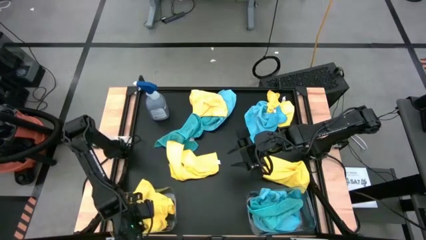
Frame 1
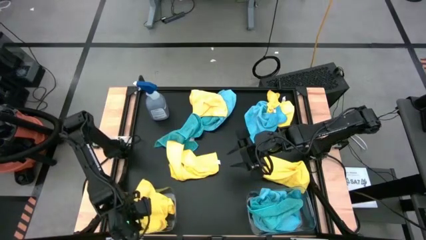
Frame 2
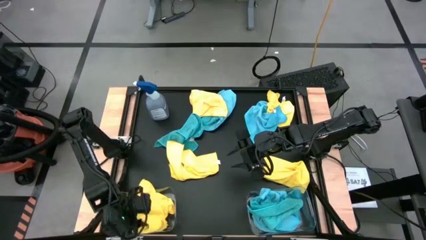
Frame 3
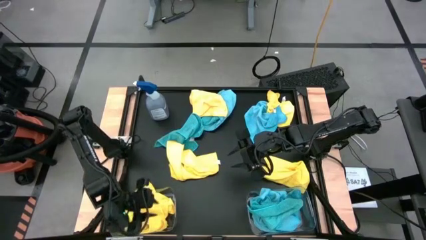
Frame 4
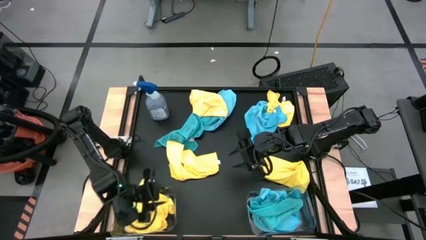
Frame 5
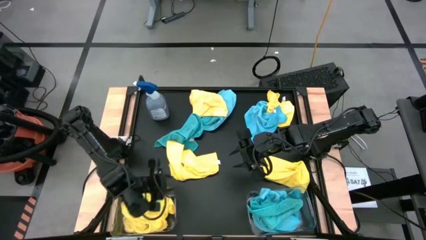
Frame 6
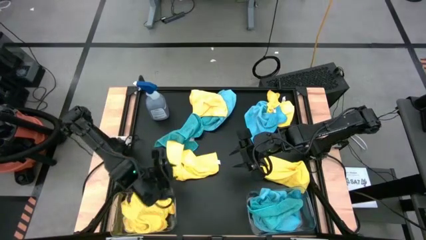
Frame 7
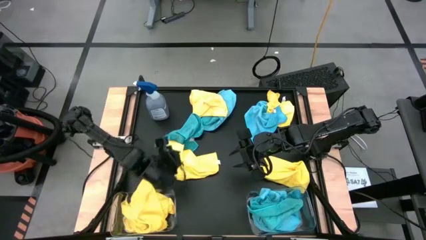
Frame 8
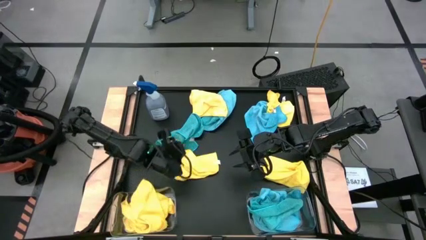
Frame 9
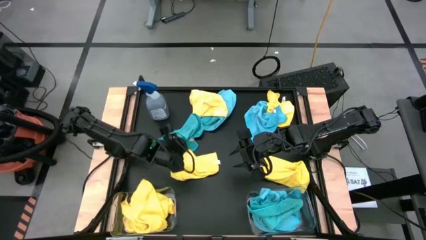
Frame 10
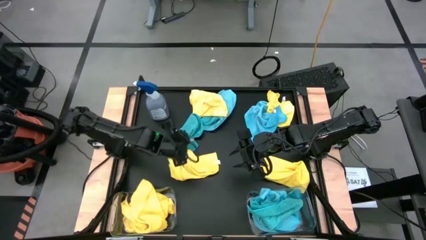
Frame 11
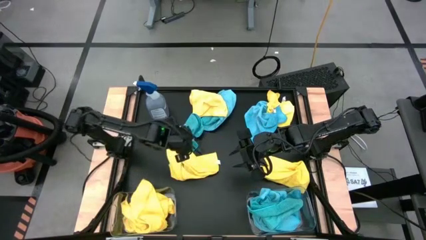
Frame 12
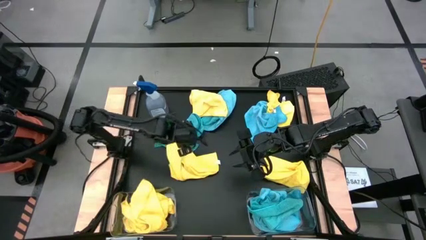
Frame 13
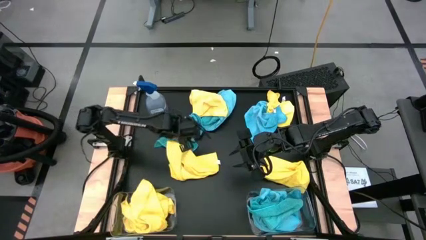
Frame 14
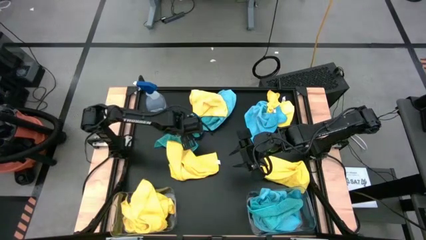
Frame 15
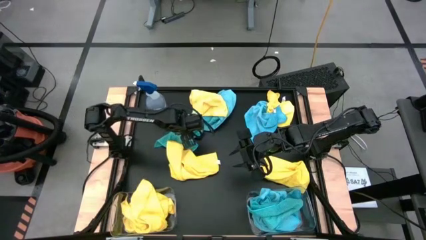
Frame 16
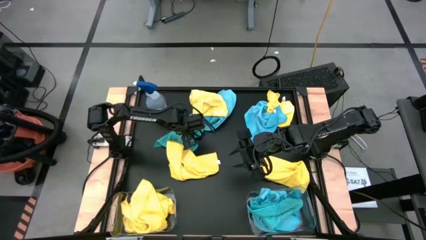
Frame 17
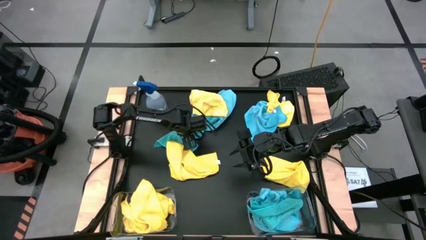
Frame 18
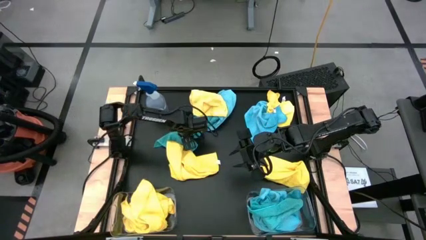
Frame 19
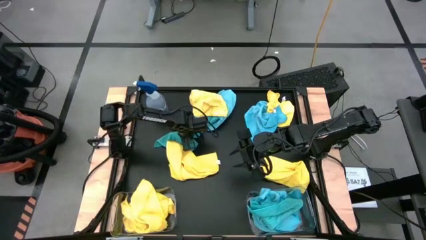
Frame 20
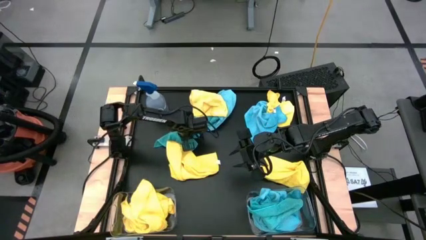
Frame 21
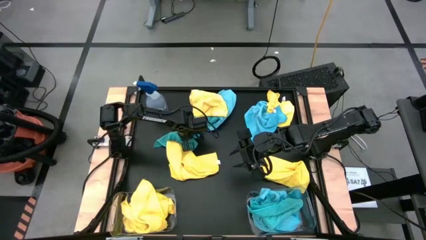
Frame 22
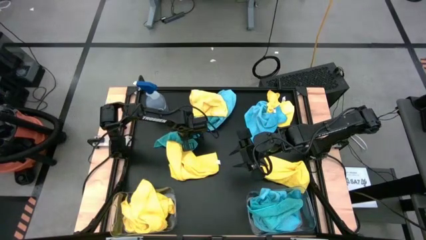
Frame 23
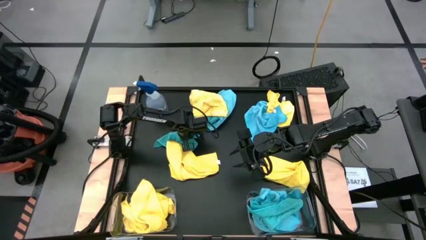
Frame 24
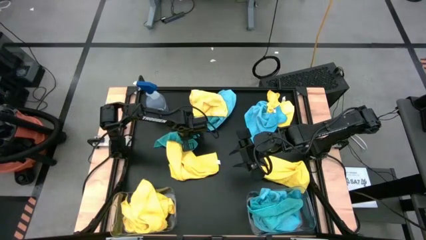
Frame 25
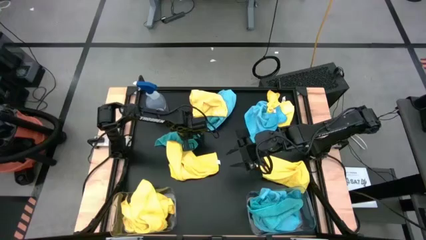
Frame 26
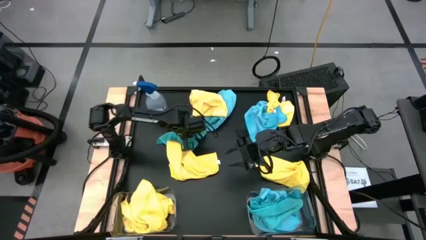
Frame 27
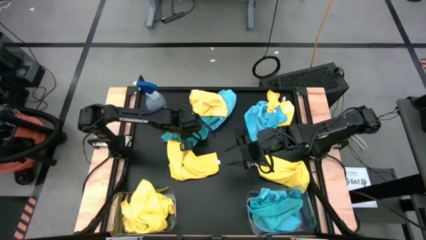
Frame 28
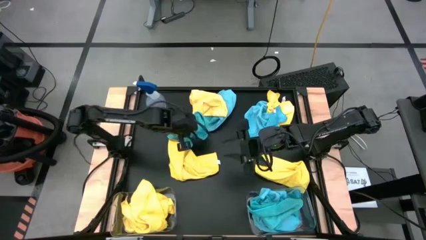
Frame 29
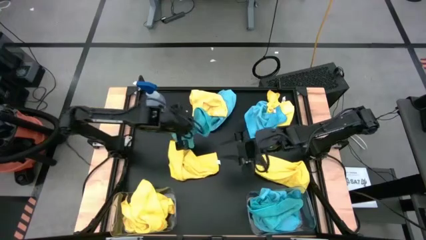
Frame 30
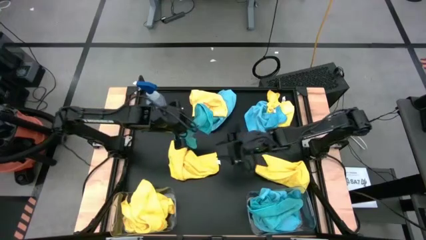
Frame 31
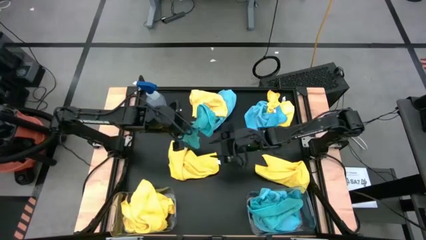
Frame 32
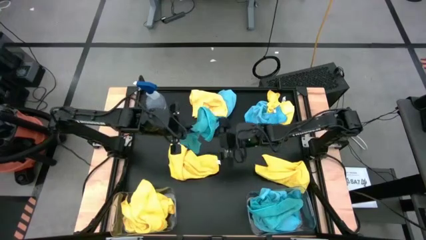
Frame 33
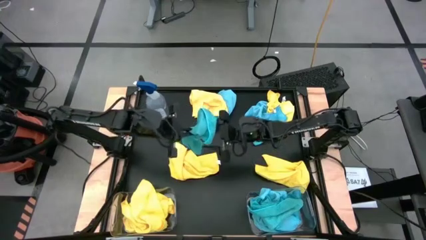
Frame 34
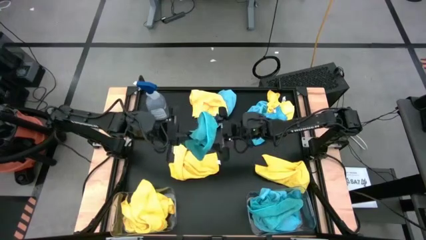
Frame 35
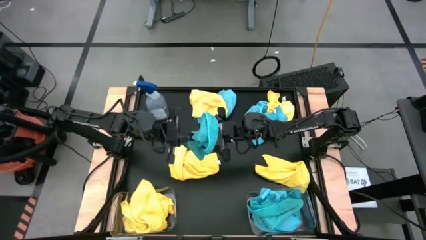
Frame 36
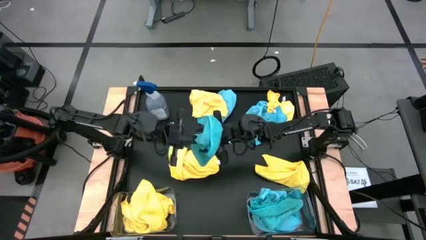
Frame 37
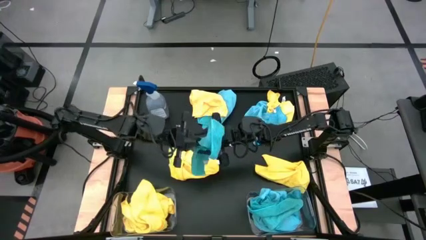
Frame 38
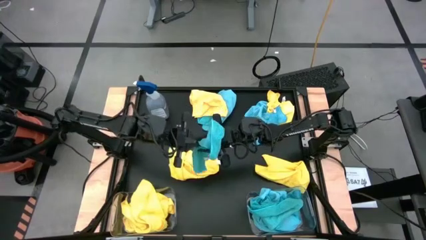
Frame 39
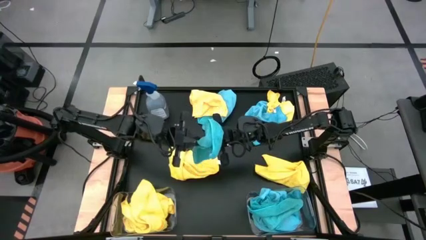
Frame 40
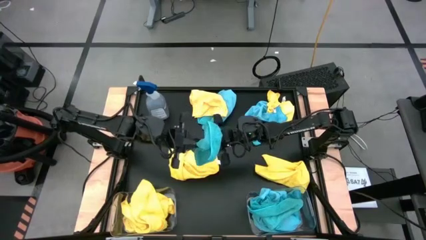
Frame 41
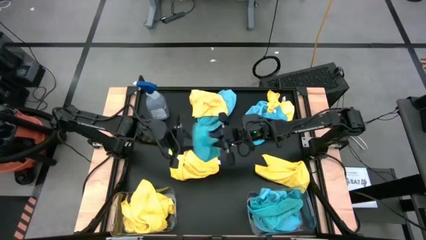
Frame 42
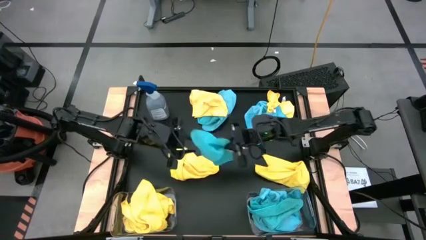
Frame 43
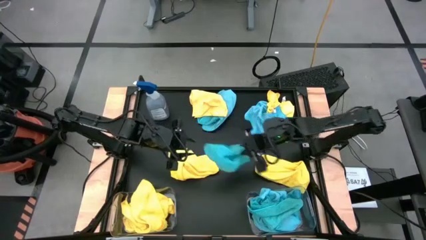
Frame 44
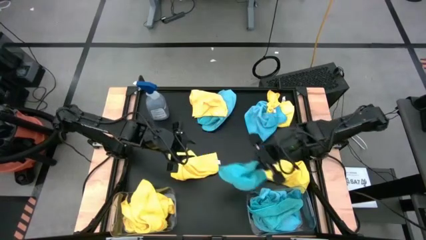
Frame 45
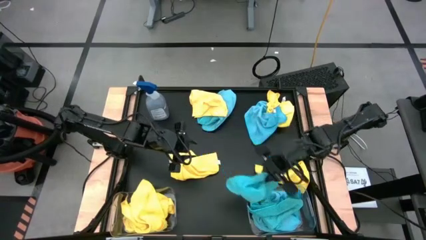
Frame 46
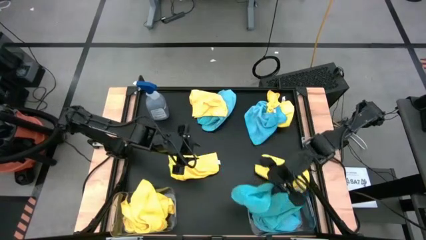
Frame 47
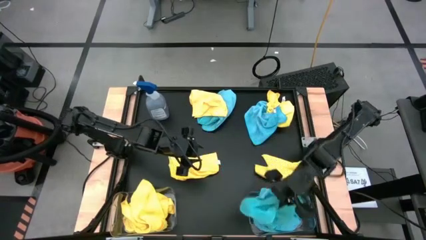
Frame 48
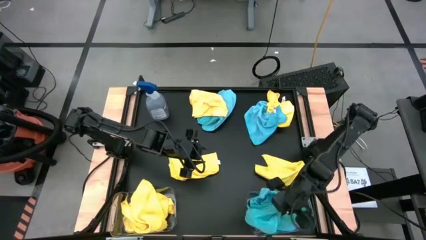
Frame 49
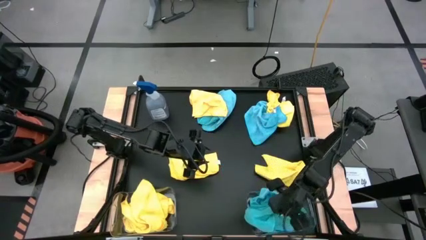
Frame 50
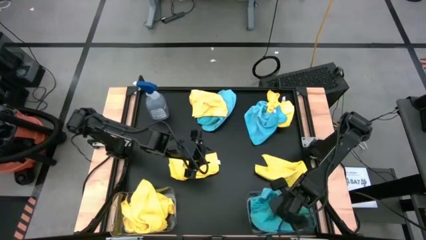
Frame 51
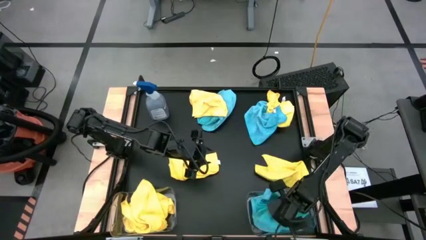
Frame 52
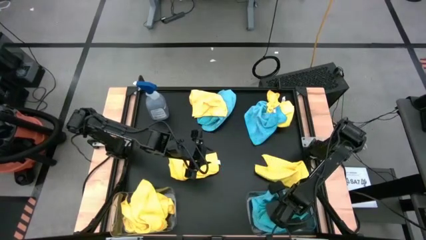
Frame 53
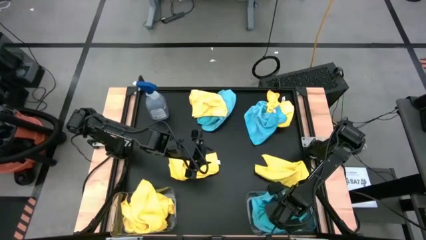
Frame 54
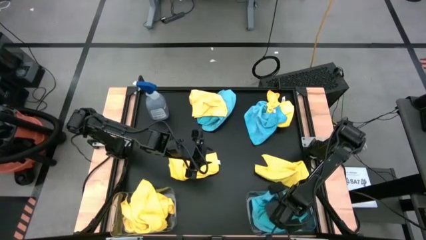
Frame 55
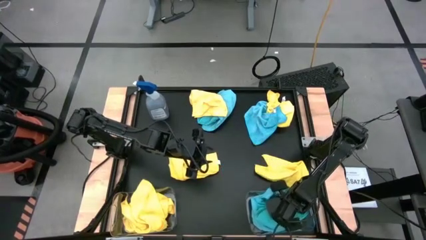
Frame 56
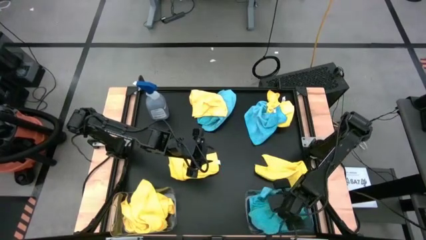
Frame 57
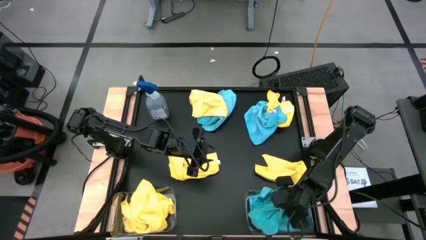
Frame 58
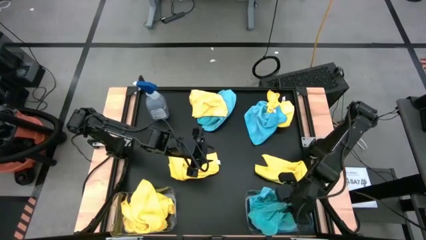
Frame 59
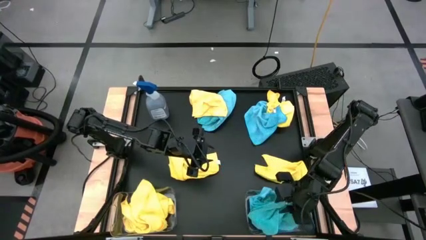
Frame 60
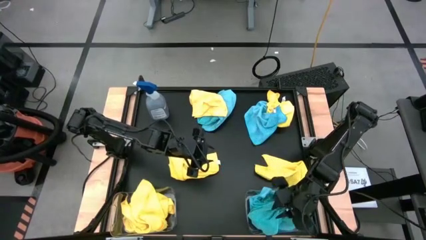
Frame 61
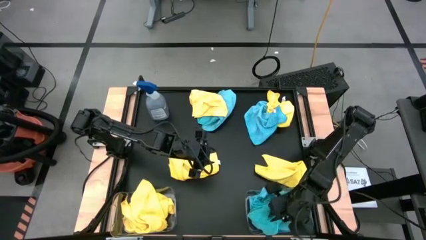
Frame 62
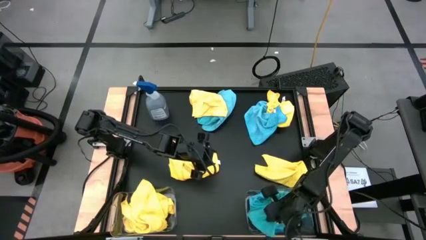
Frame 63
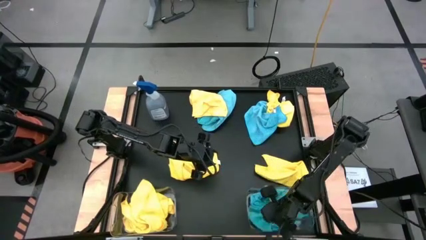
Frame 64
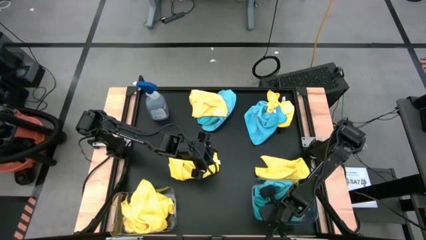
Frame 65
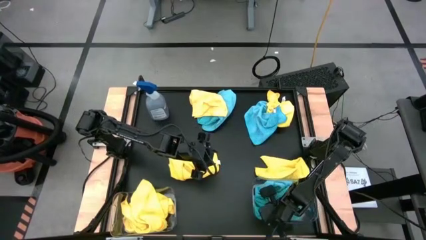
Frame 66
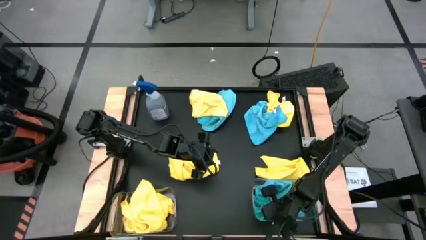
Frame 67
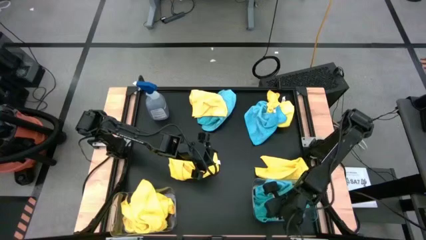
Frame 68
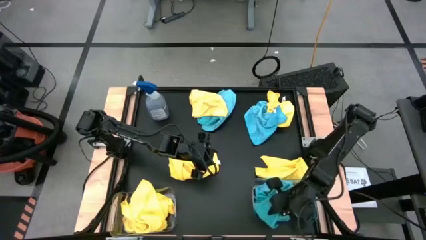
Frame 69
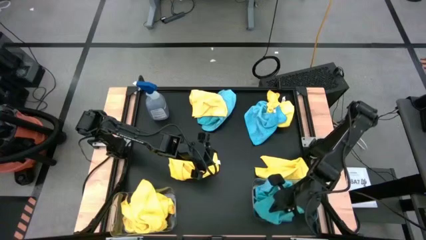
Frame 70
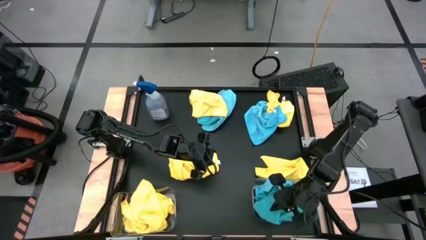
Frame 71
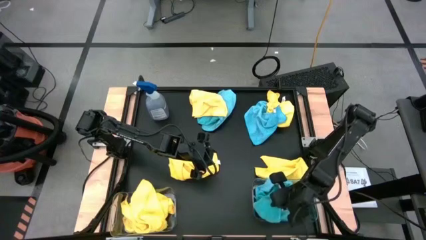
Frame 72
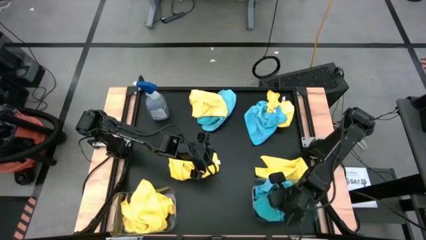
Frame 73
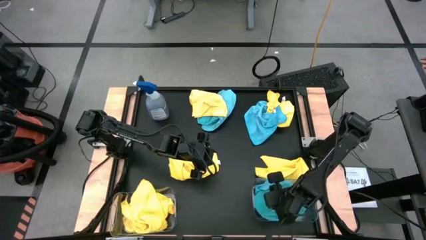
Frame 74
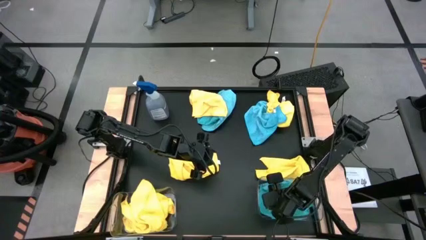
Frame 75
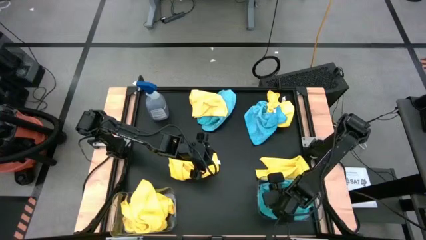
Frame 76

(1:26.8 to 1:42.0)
Task: Sort microfiber towel by color & place in baskets
Put the blue towel into the right transparent bin
